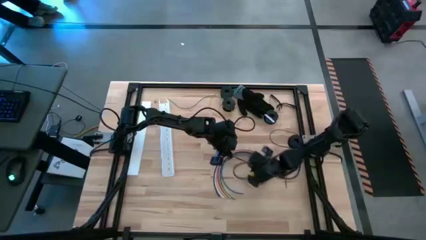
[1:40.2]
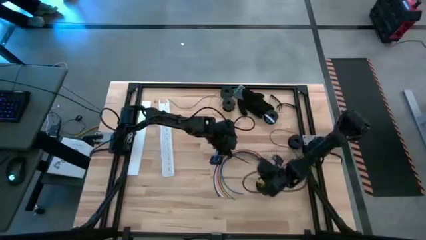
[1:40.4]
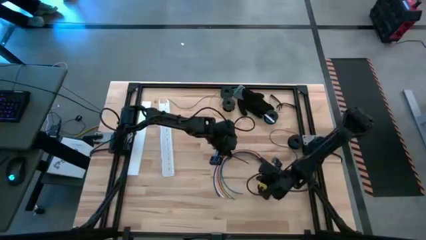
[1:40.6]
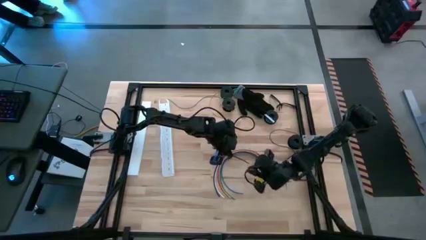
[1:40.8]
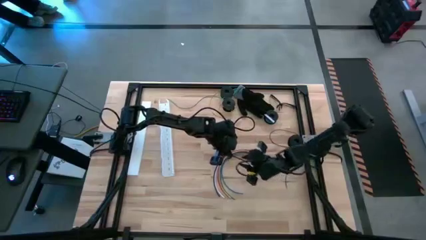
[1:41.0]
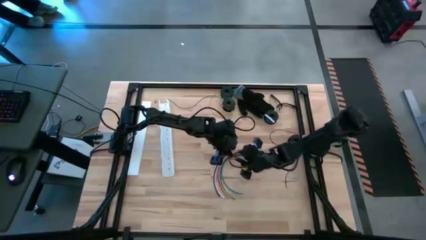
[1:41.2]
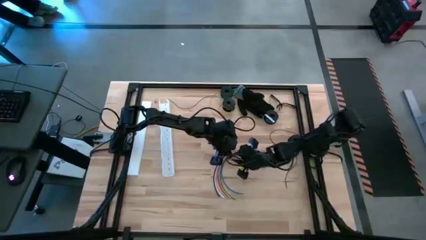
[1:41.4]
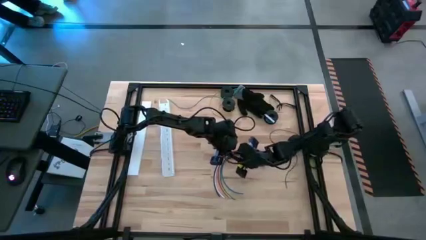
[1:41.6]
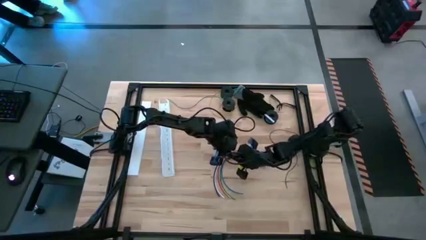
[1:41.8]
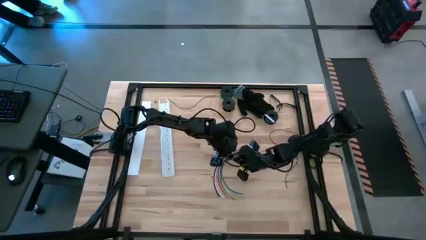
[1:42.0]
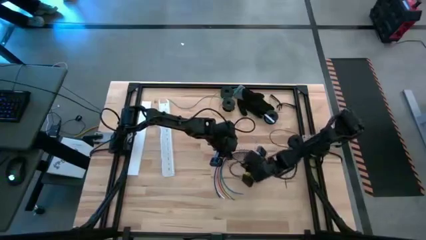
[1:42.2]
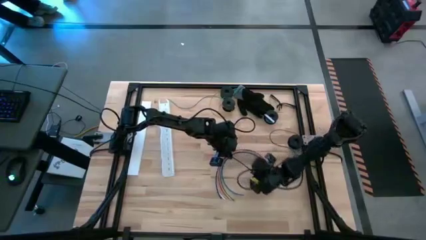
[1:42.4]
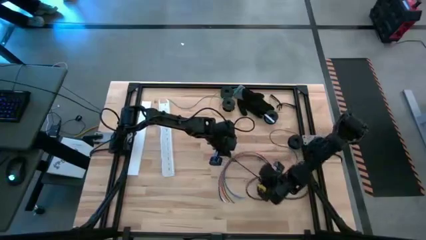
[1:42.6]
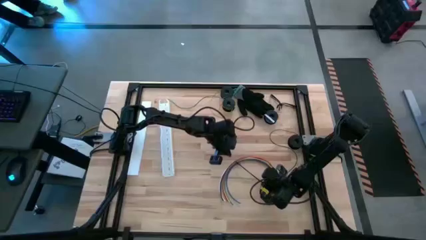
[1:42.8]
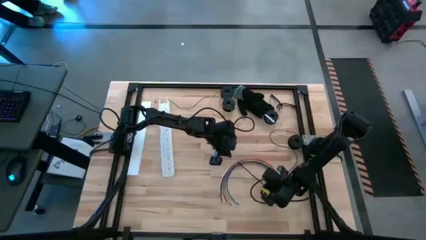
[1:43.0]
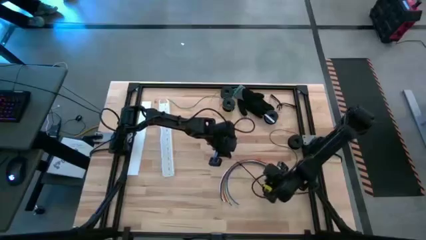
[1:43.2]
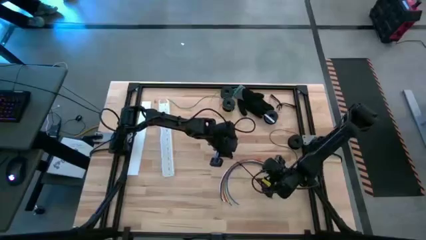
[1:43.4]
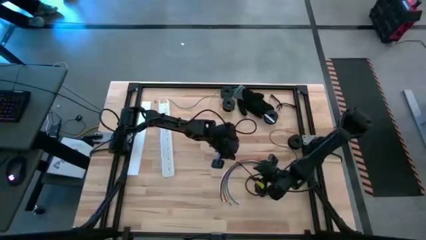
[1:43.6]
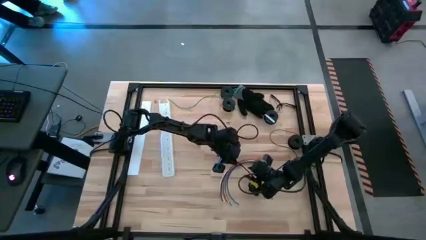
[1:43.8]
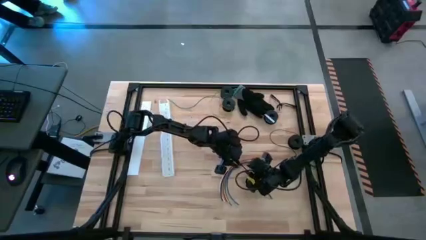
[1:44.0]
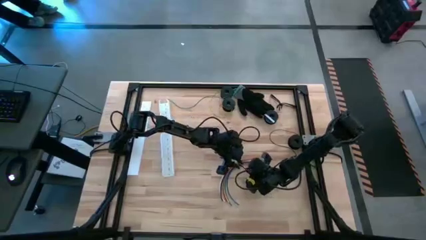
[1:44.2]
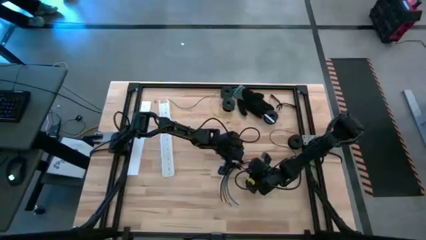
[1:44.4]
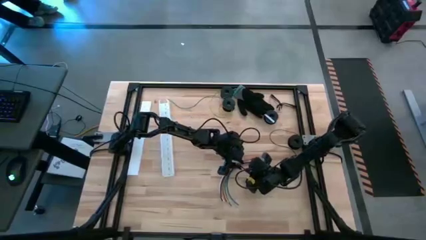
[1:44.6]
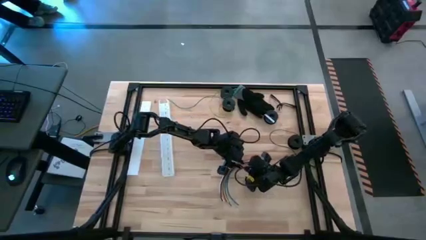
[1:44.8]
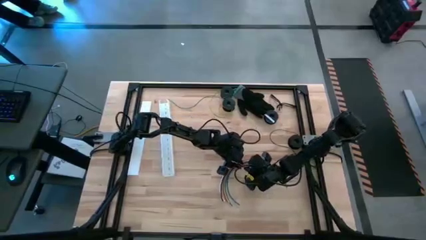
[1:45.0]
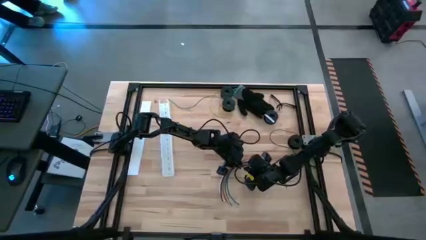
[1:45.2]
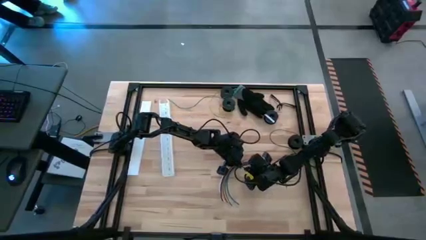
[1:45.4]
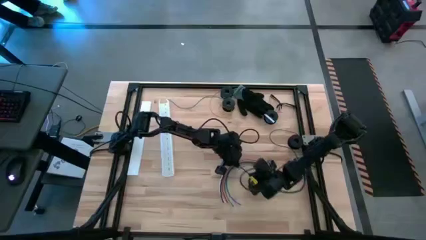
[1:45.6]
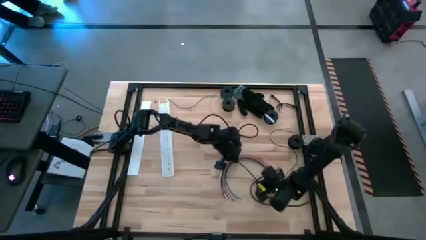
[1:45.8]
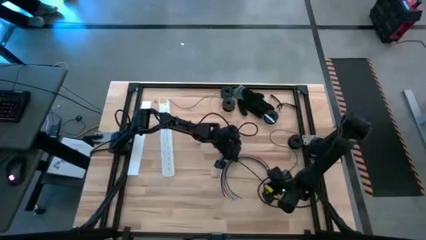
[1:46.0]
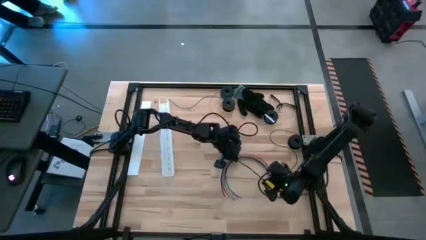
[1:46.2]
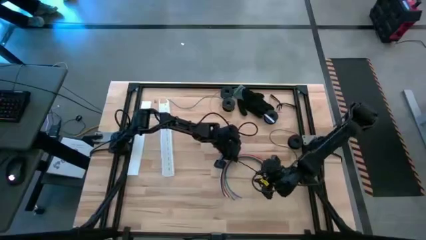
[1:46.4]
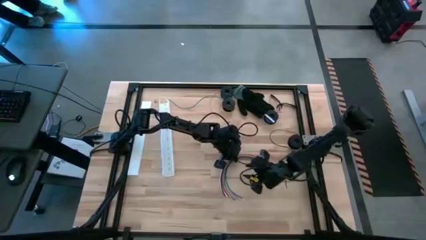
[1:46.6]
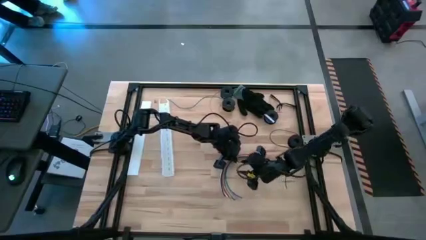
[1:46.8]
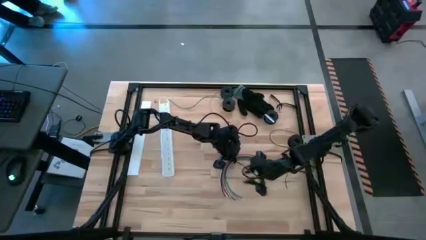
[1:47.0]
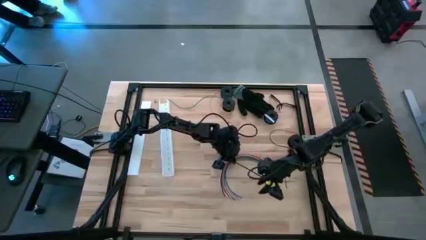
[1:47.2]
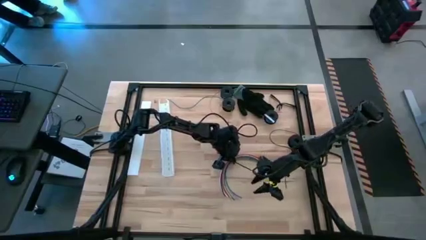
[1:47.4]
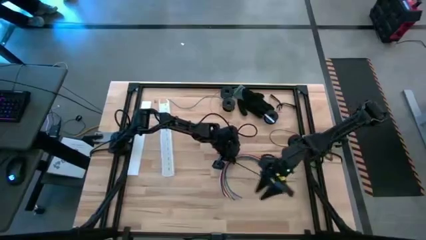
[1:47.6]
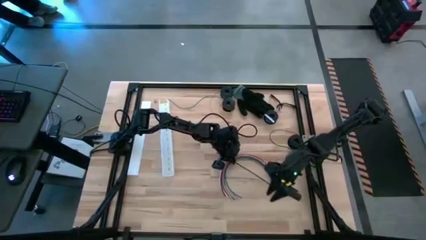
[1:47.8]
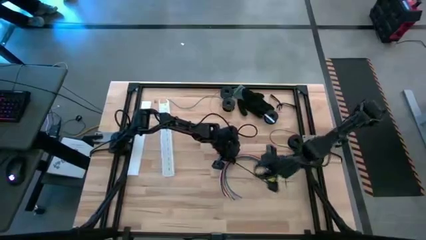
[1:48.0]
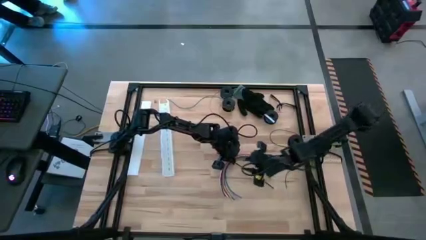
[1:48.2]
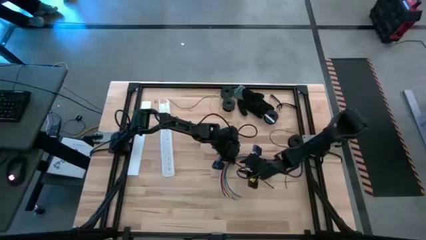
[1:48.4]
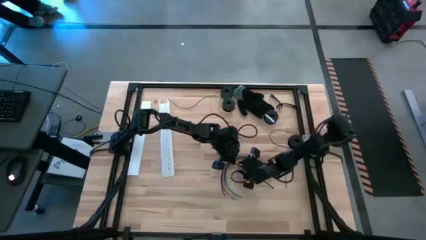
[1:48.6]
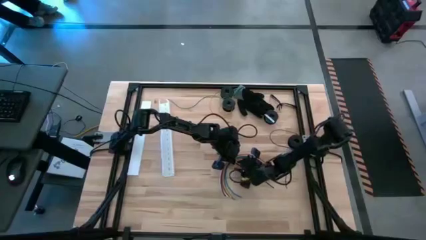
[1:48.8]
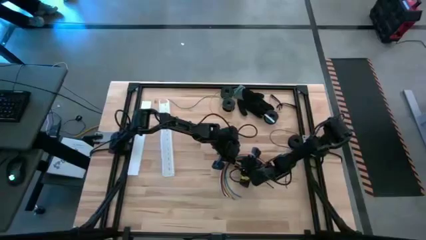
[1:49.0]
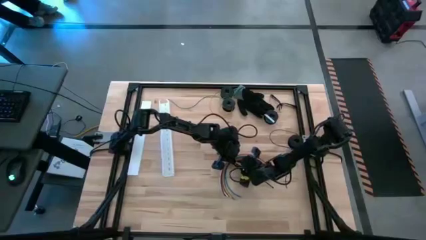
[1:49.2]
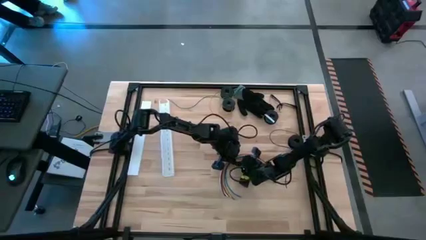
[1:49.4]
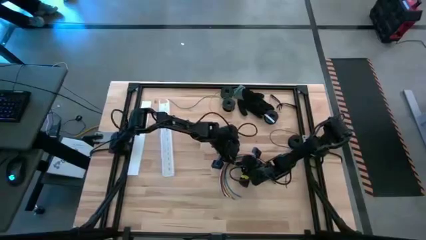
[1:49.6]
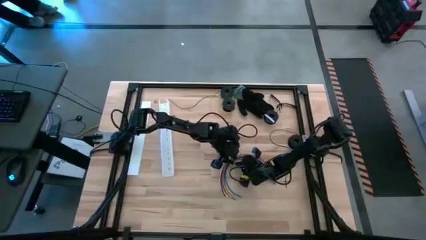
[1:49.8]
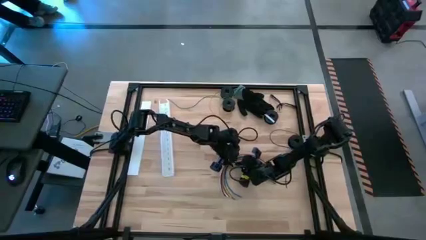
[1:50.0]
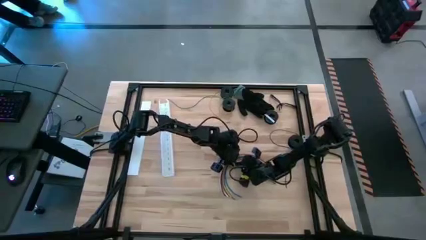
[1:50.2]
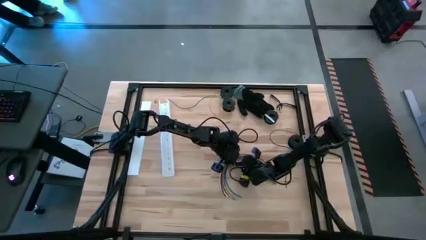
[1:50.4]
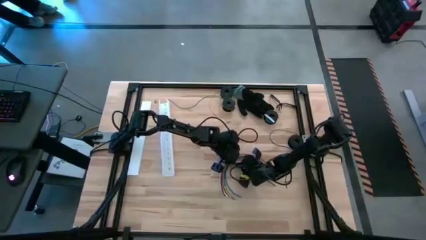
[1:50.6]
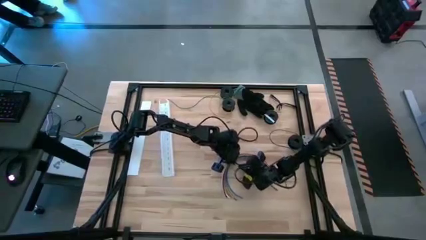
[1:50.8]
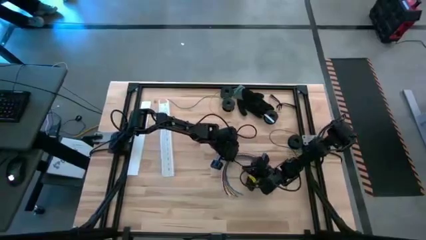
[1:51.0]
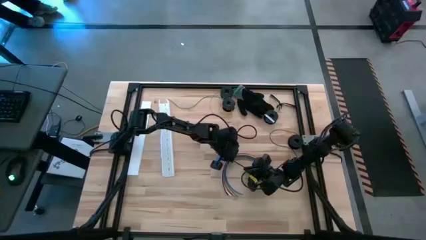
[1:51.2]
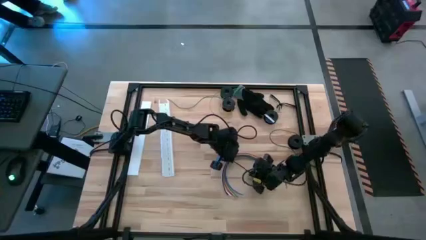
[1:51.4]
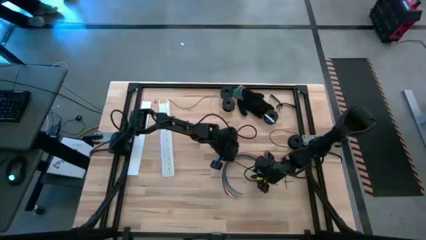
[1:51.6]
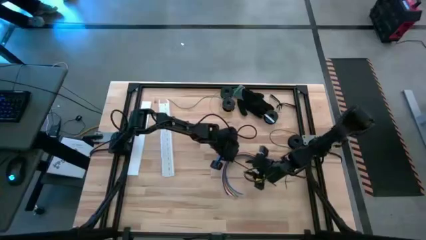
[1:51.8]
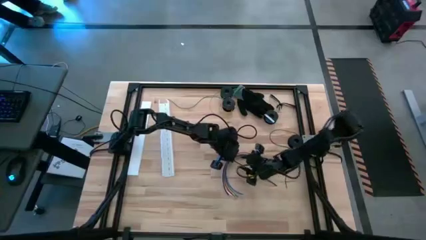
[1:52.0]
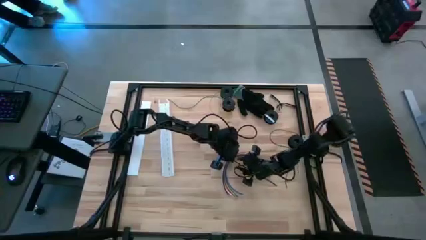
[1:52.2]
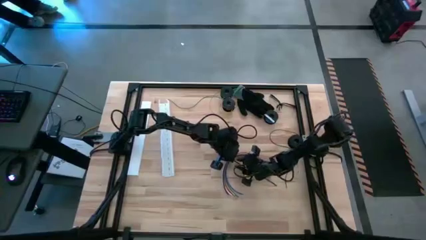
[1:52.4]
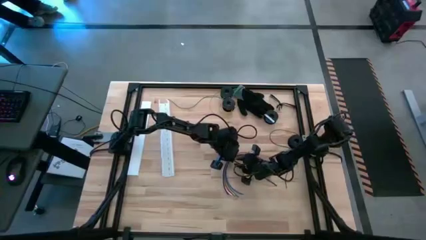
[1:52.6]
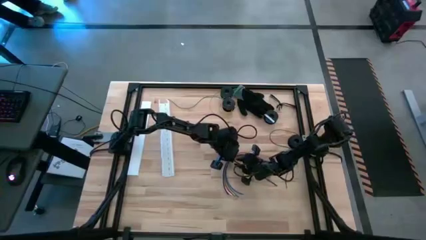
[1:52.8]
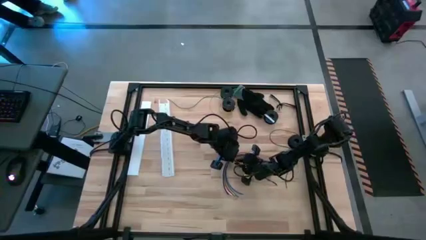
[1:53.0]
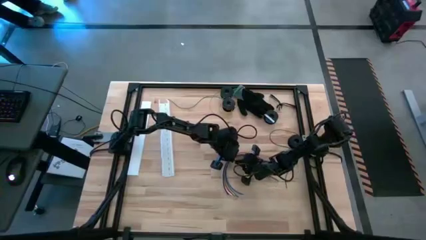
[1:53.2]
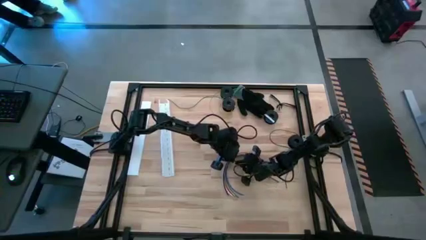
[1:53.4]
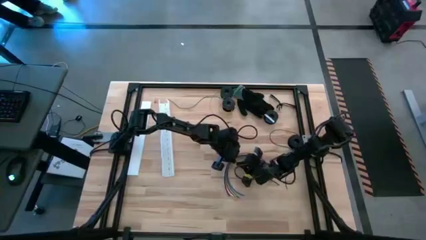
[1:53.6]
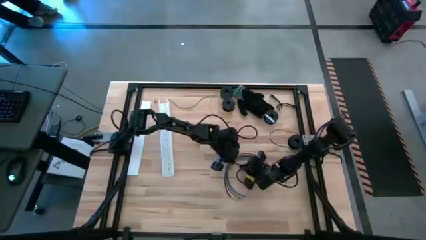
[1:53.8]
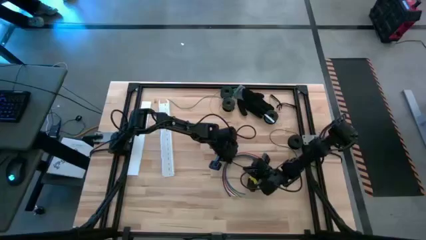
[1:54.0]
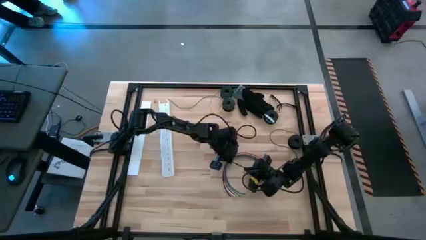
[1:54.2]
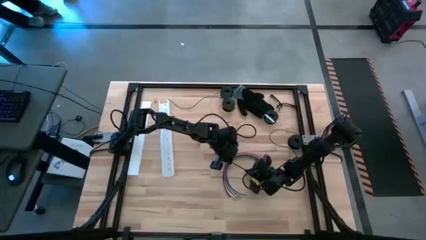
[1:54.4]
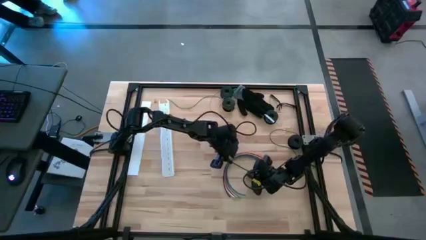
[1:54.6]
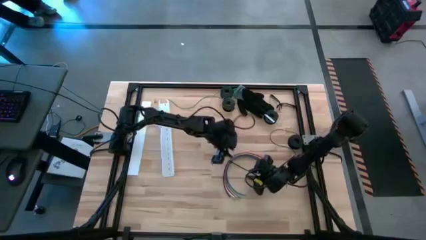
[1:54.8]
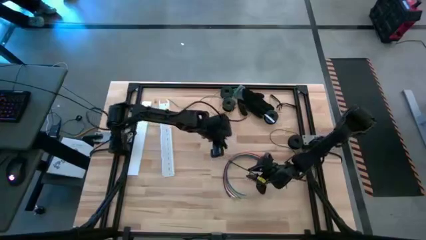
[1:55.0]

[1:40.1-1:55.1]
Task: Ziptie cables
Wrap the cables together using a black zip tie
